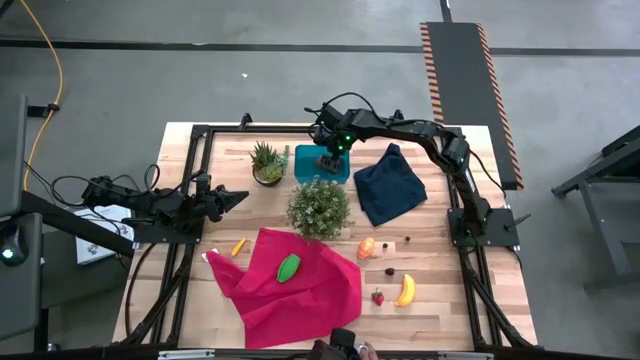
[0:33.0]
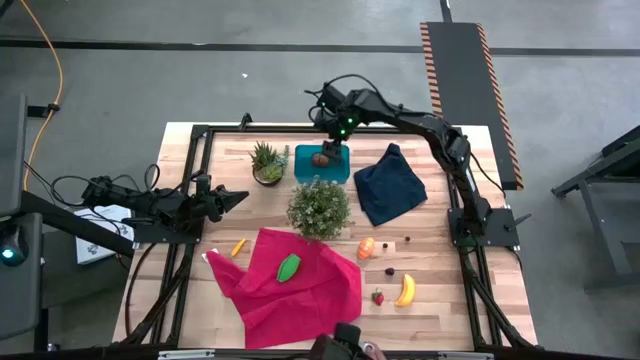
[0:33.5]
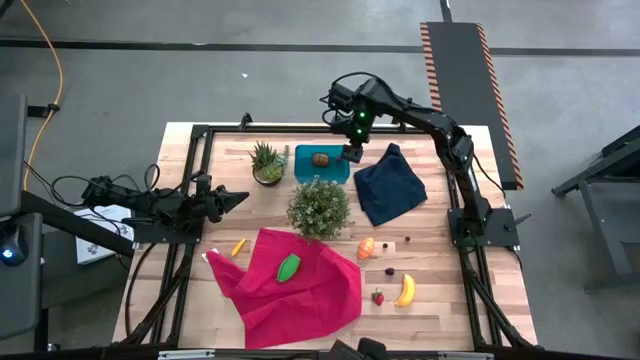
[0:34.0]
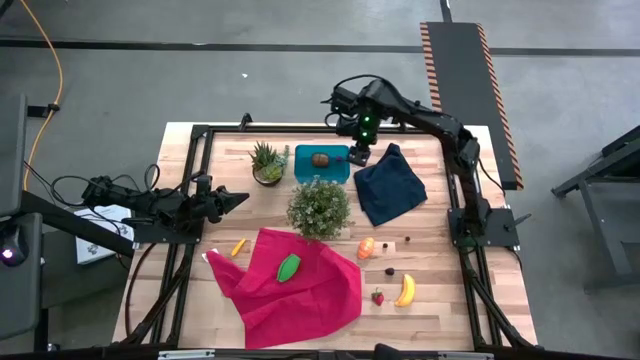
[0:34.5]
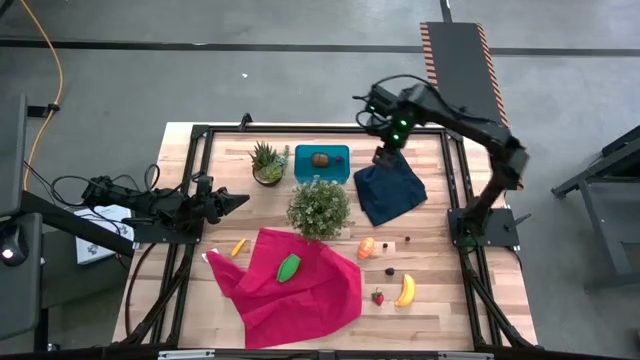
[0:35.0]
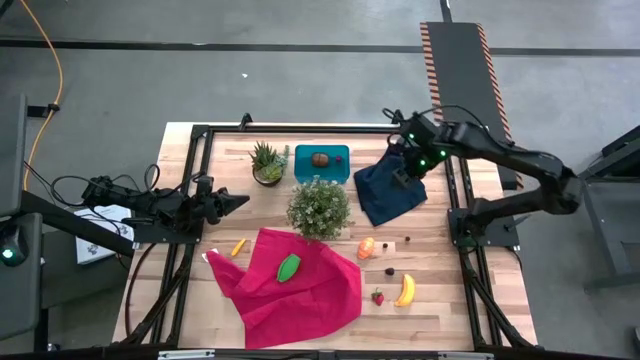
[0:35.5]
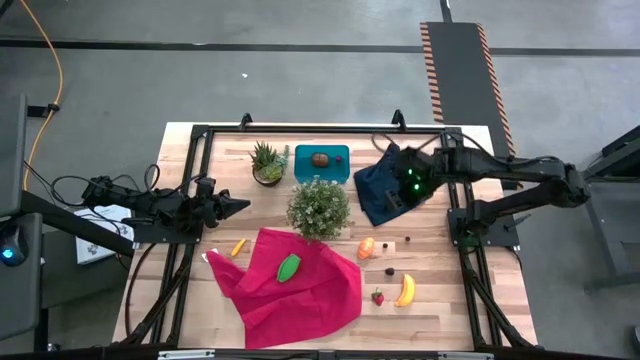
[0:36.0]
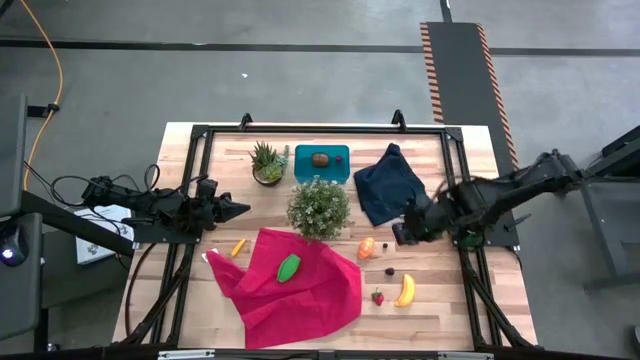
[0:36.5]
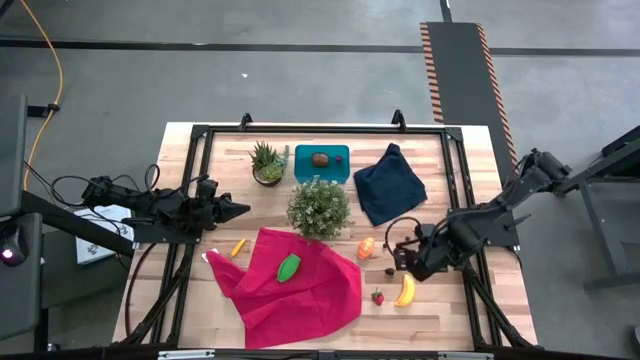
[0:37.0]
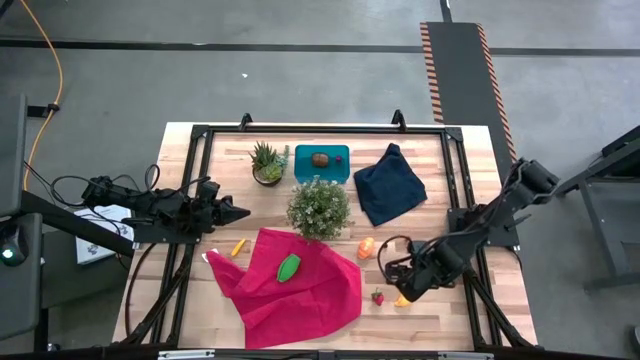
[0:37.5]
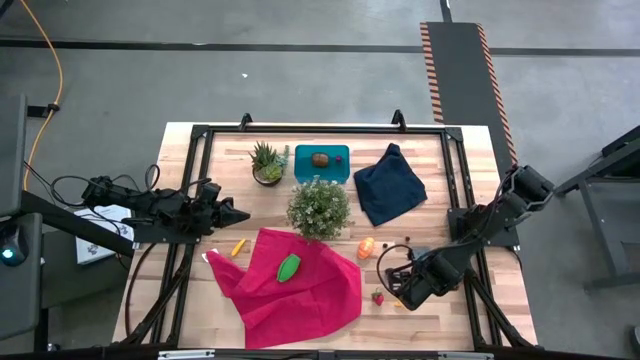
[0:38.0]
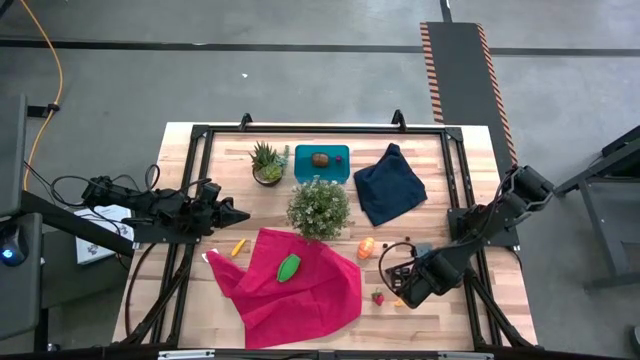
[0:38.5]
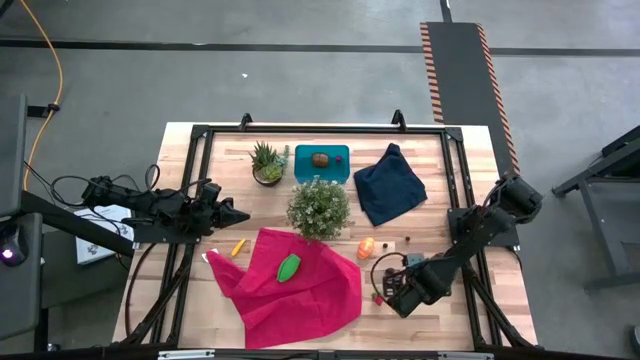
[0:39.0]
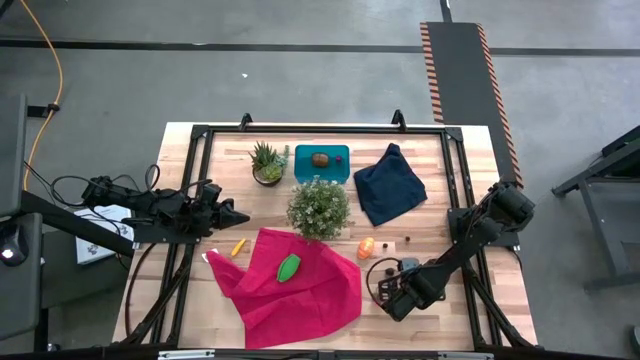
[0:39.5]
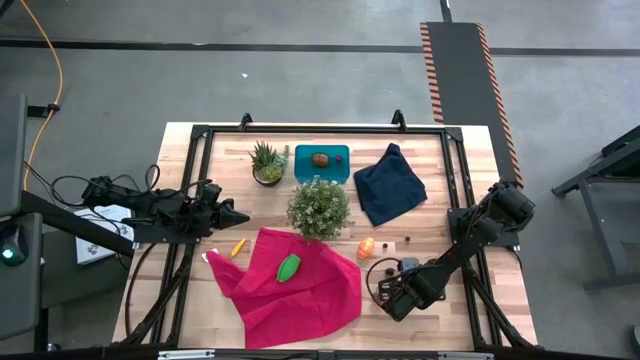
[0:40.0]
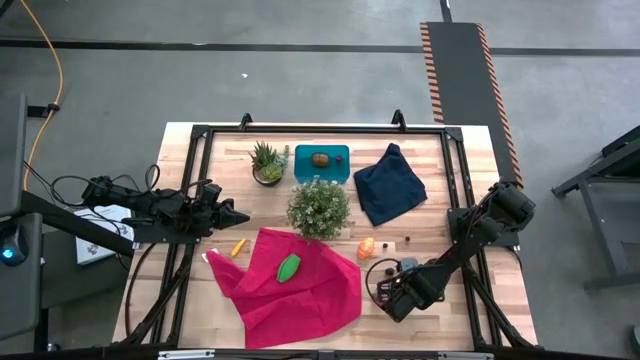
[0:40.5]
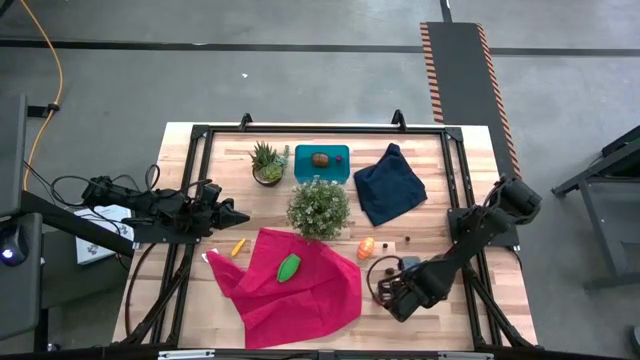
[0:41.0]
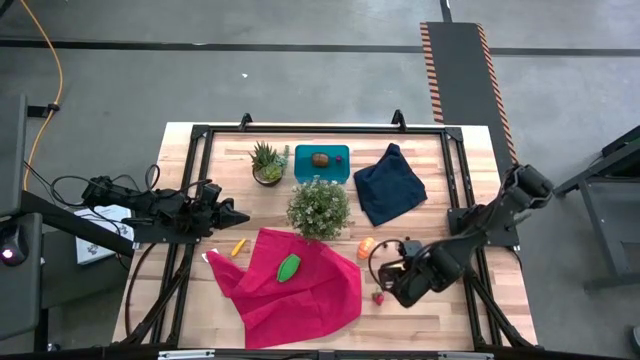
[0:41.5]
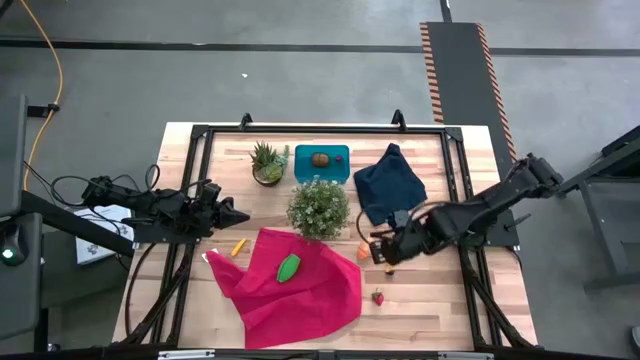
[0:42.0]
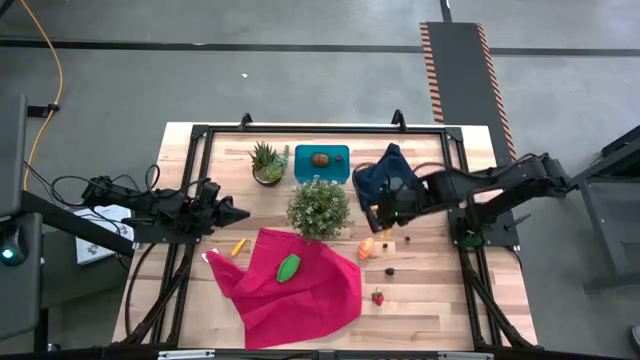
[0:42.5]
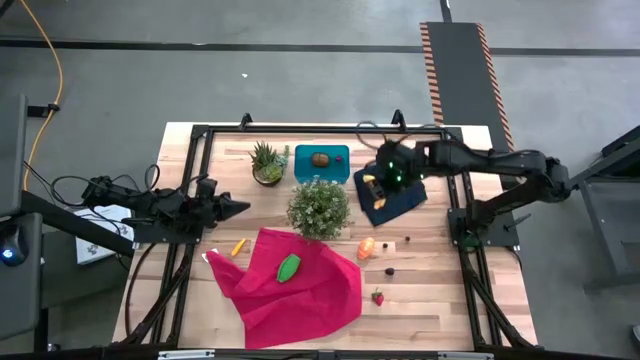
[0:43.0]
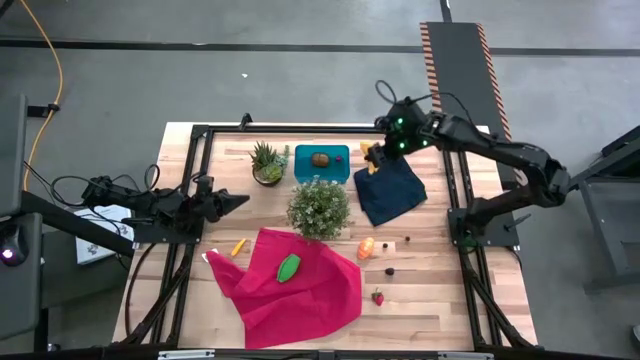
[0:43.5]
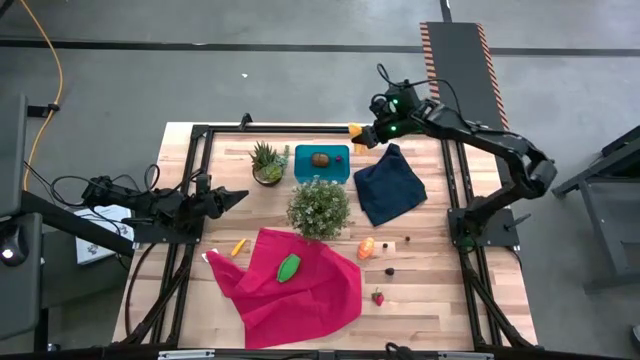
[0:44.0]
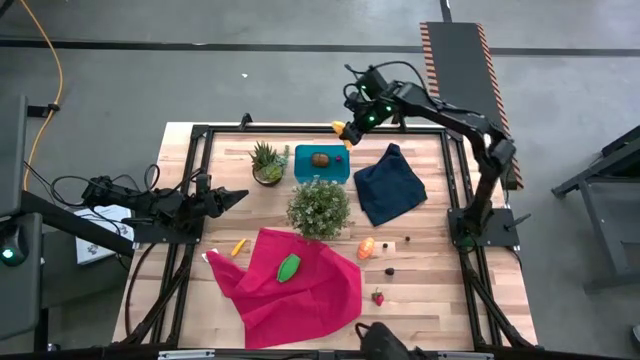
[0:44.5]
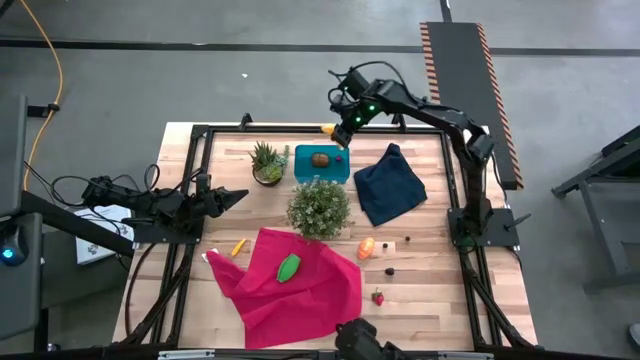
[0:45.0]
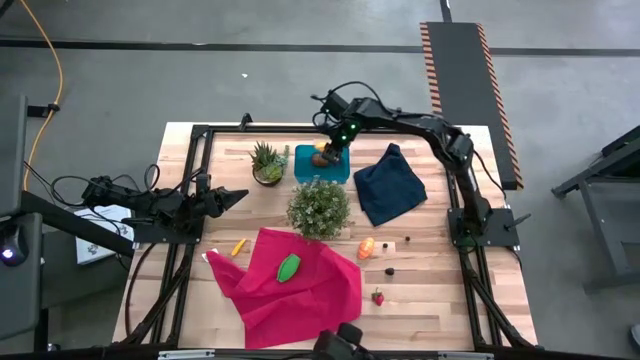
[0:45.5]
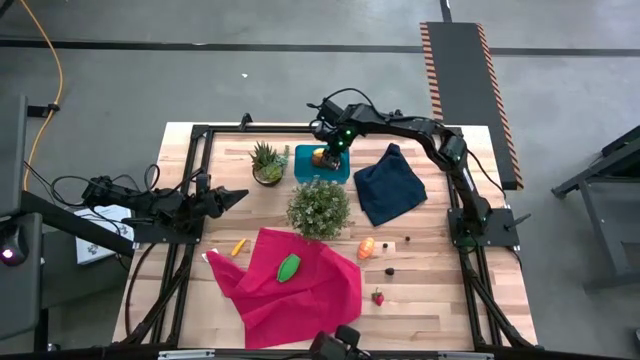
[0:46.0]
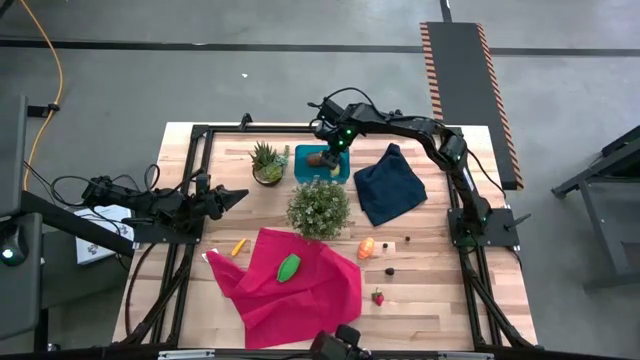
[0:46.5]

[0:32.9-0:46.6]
Task: Pick and placing Produce into tupperware
Put the yellow banana into the blue bin
